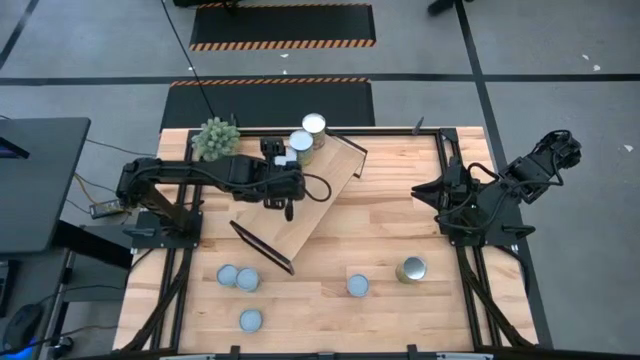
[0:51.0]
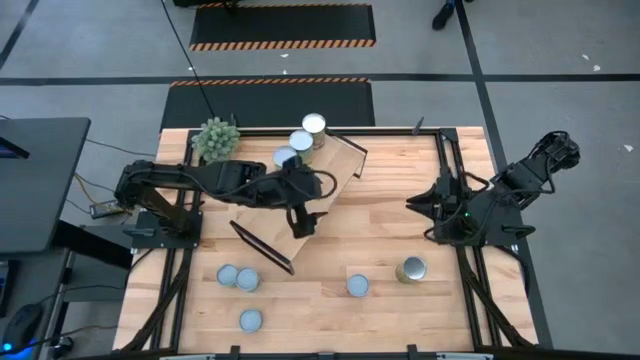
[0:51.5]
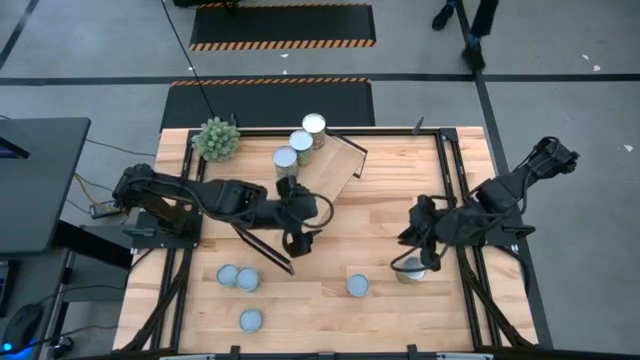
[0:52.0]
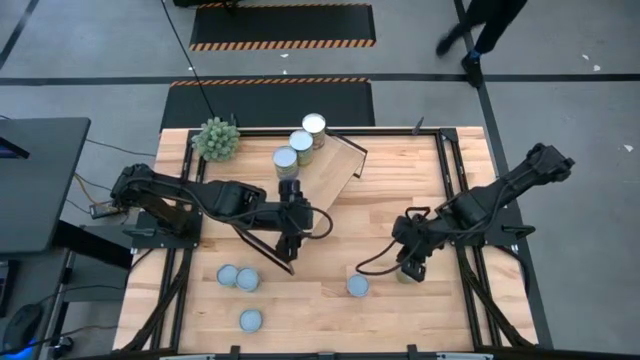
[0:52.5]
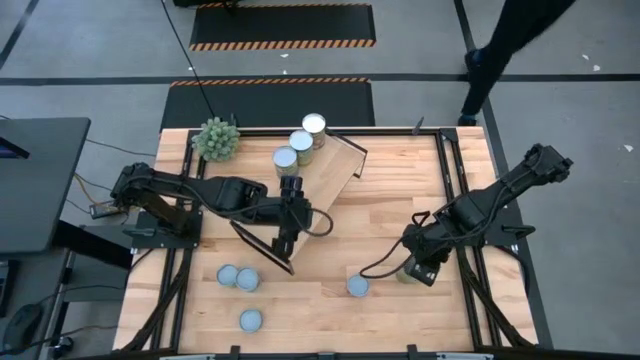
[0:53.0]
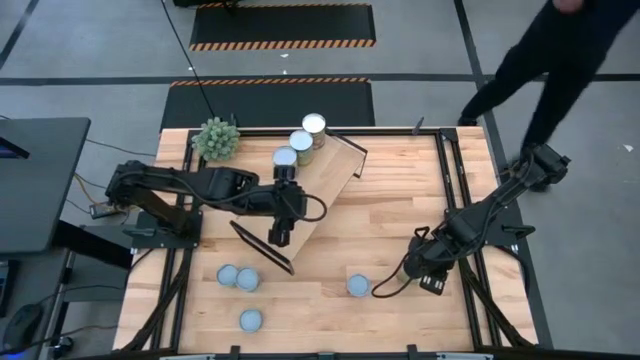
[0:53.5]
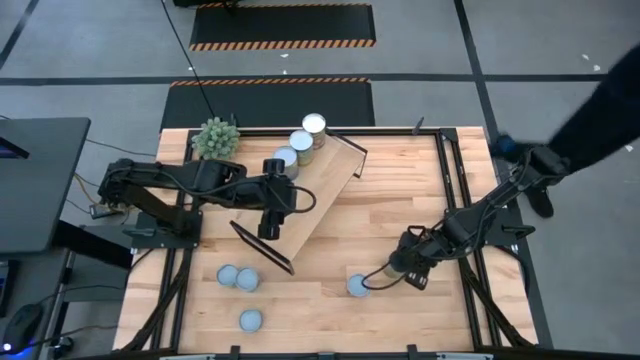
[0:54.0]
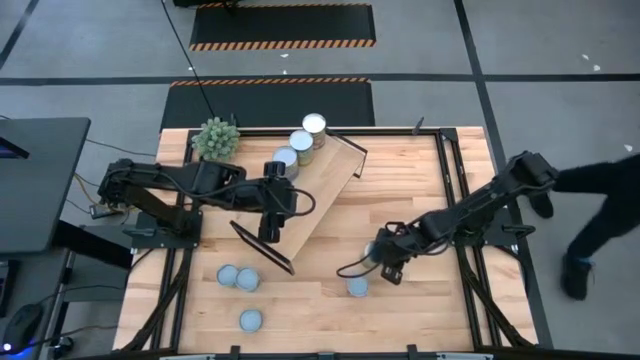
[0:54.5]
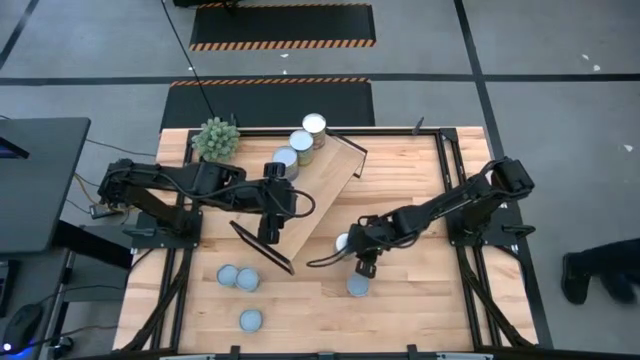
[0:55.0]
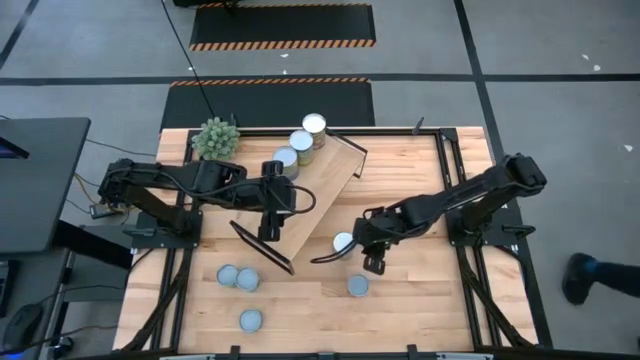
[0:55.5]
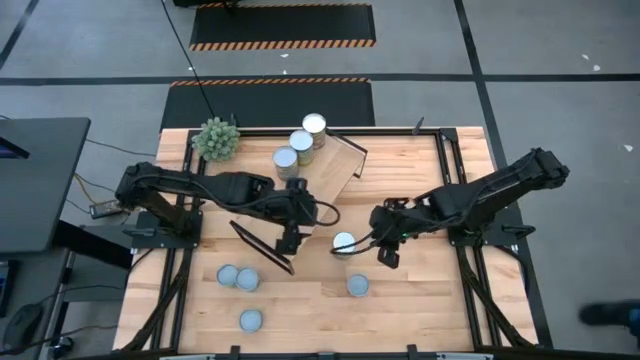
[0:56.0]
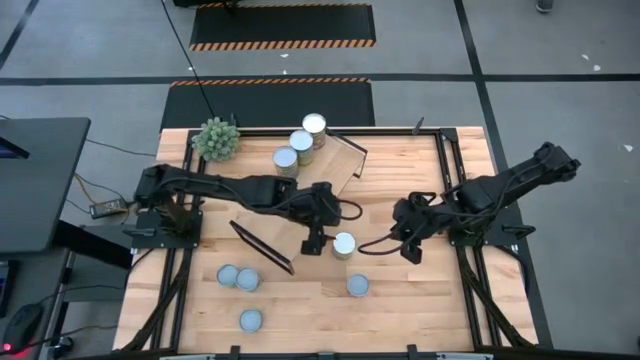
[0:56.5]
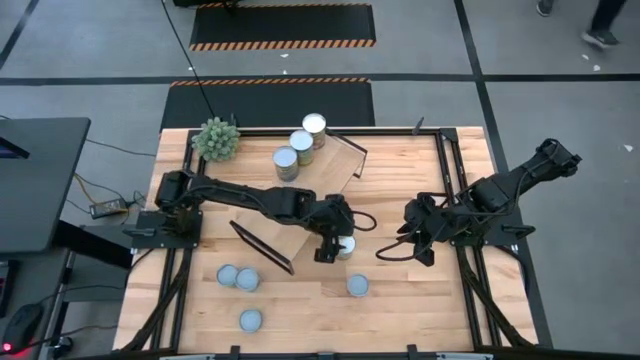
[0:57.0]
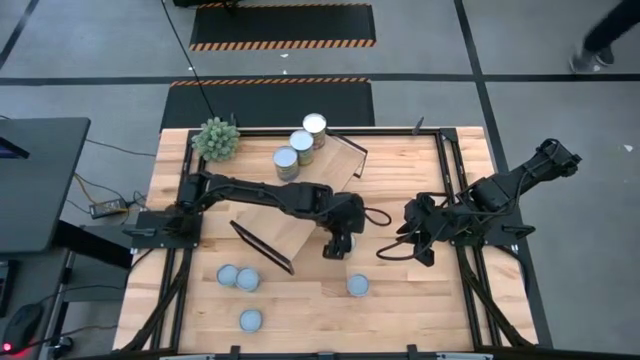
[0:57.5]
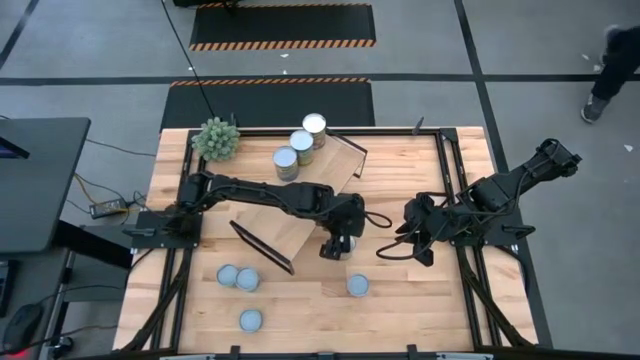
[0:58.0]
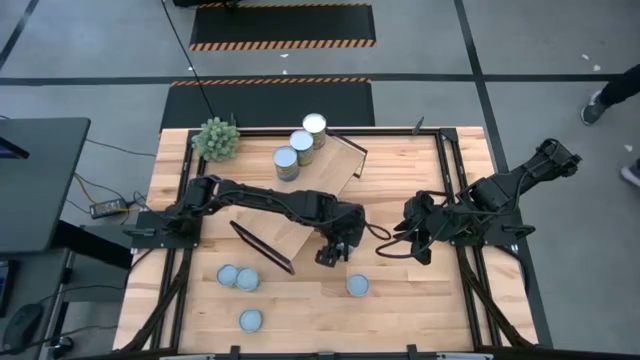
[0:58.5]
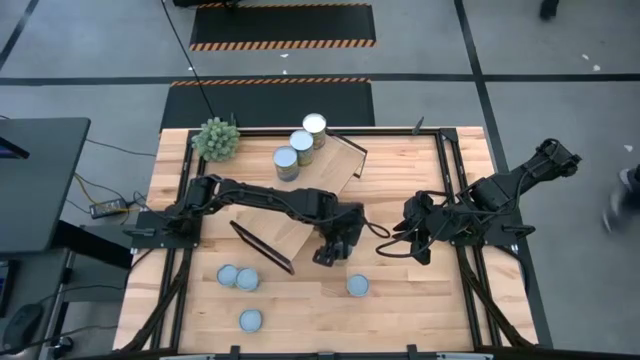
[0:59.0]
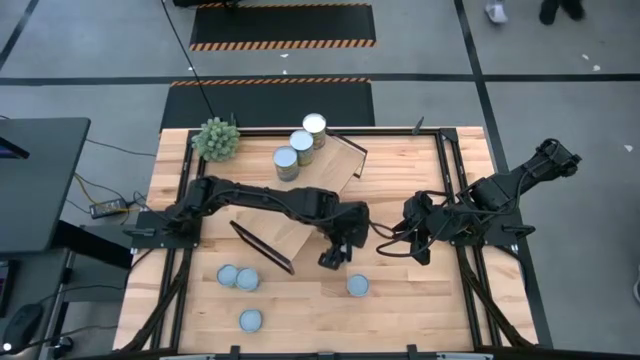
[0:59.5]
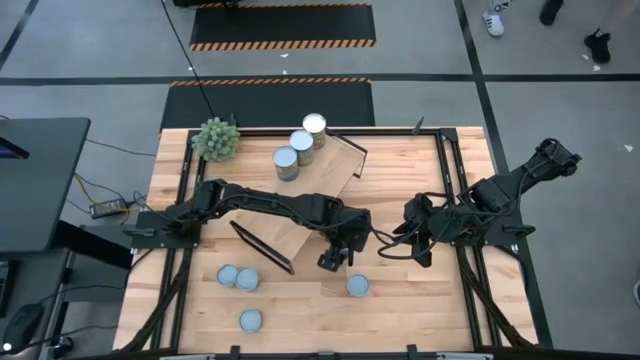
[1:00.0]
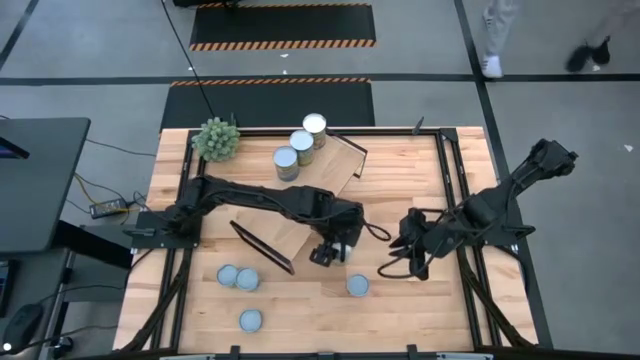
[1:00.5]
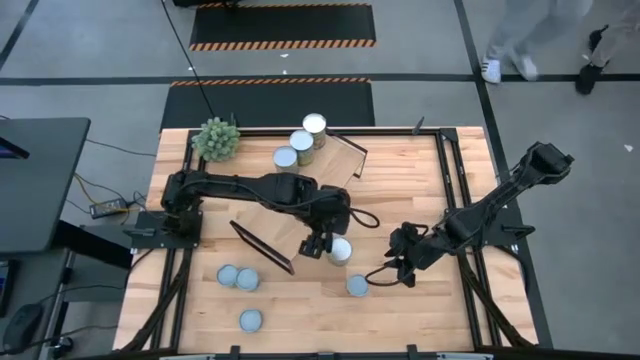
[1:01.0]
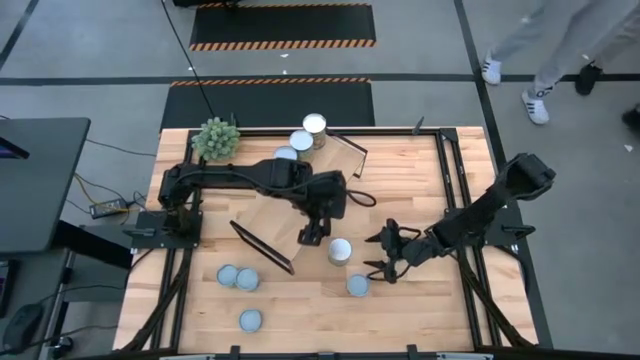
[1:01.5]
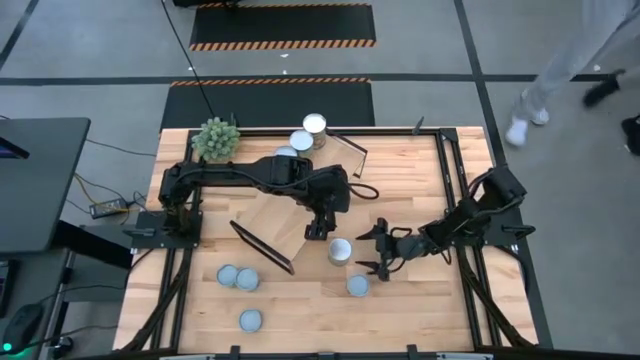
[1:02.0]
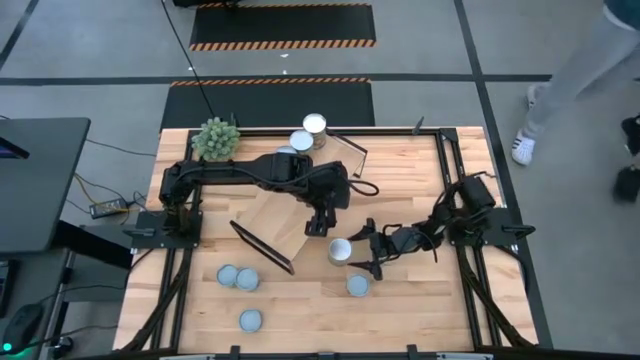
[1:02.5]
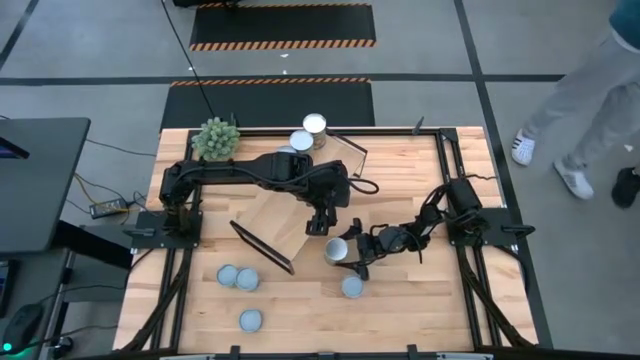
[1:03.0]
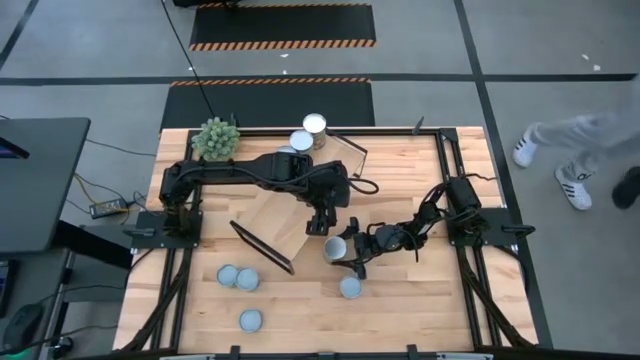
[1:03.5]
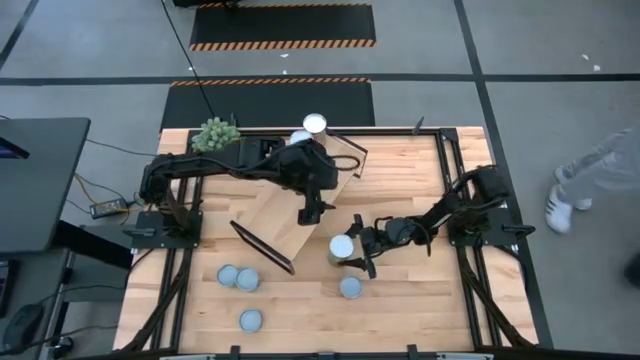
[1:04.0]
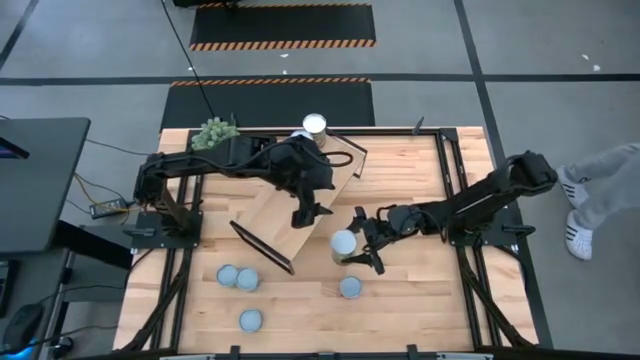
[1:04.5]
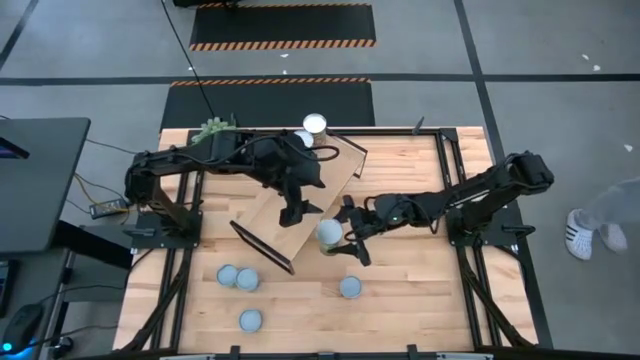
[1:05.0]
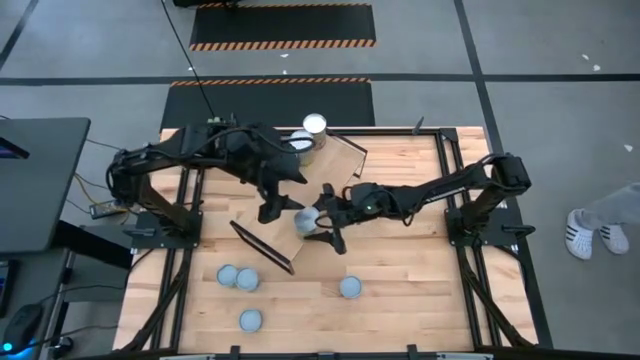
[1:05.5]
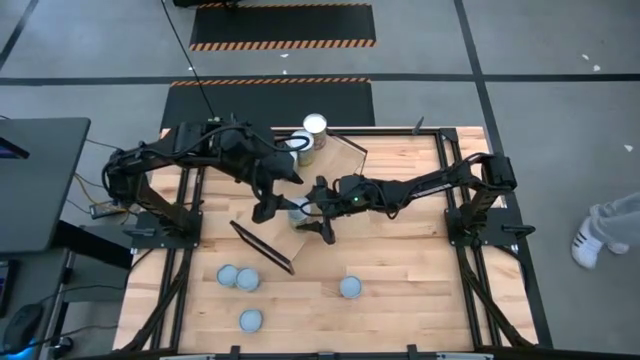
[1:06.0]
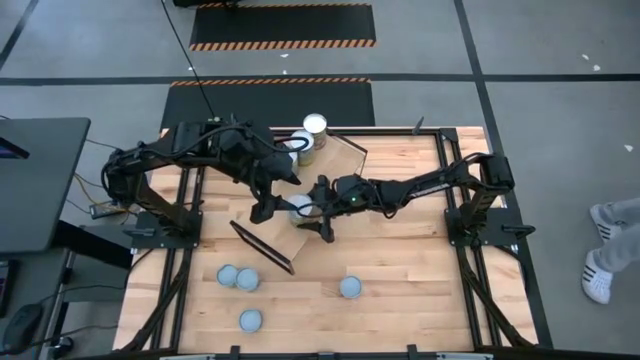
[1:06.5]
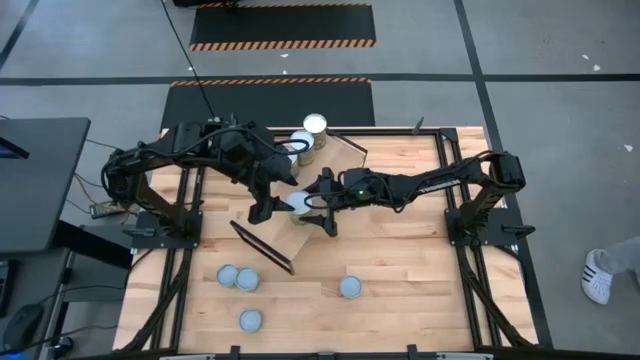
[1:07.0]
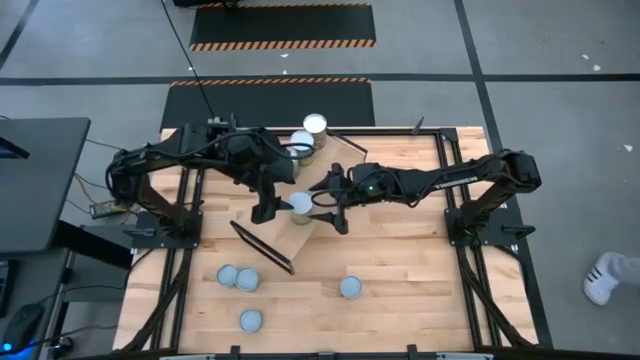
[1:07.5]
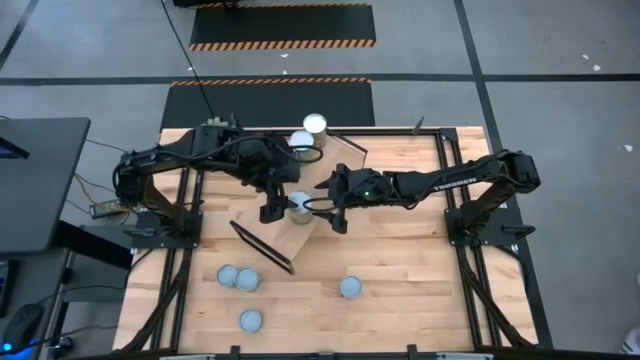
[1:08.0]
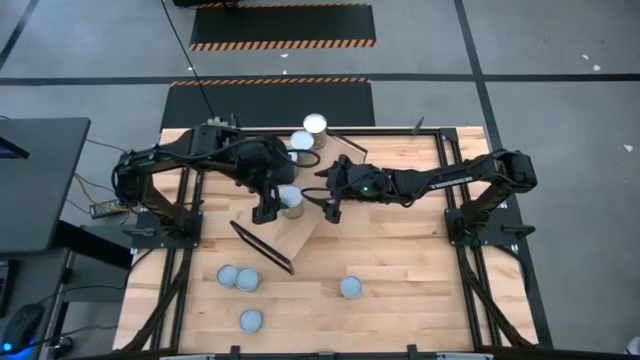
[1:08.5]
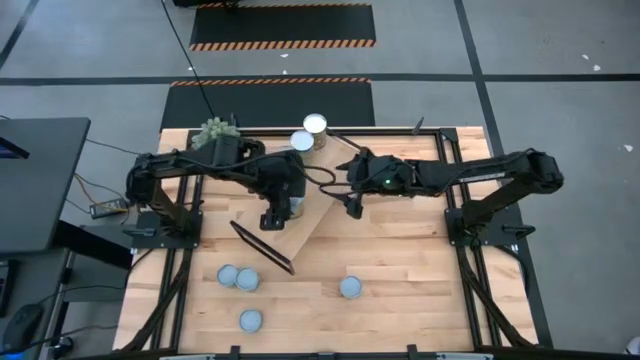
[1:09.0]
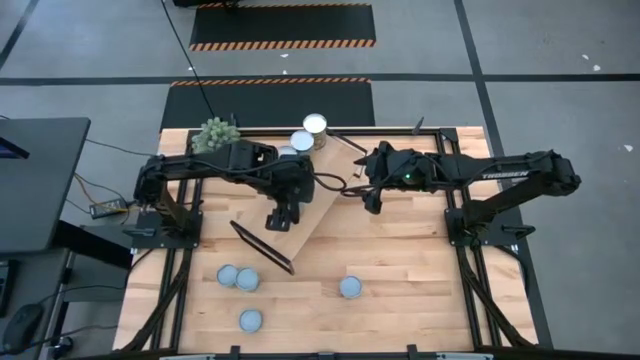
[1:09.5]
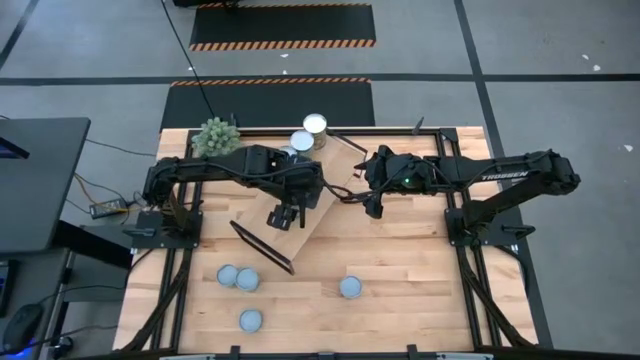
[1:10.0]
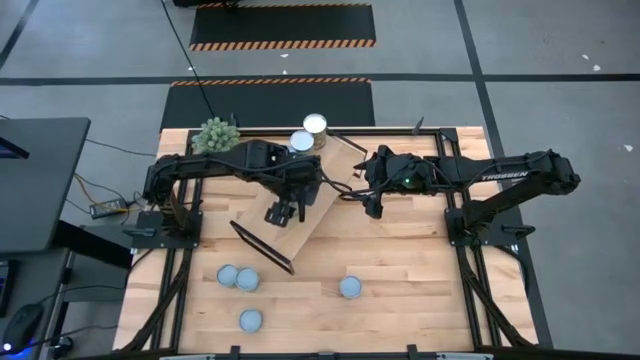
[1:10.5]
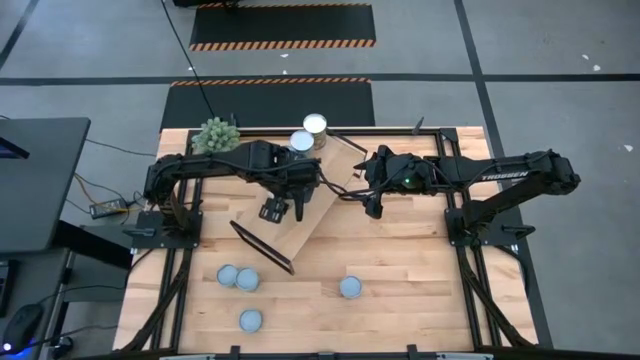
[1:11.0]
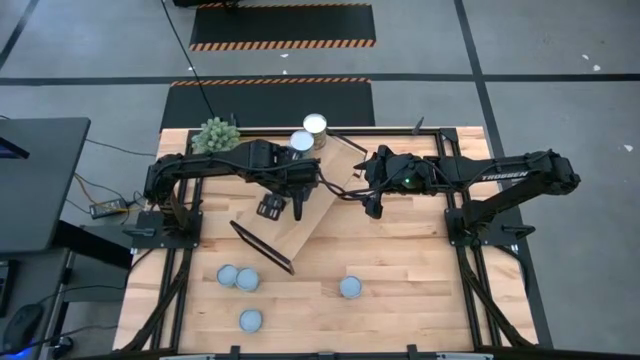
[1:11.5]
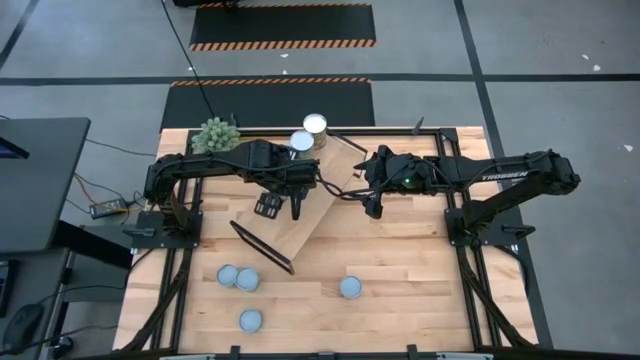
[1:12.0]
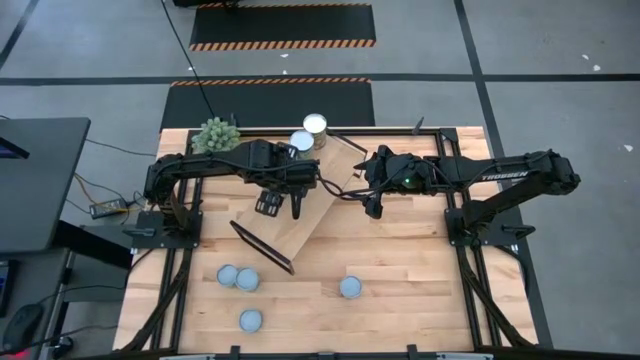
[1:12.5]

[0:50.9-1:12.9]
Task: Pick and place cans onto a shelf
Put the canned oranges on the shelf
